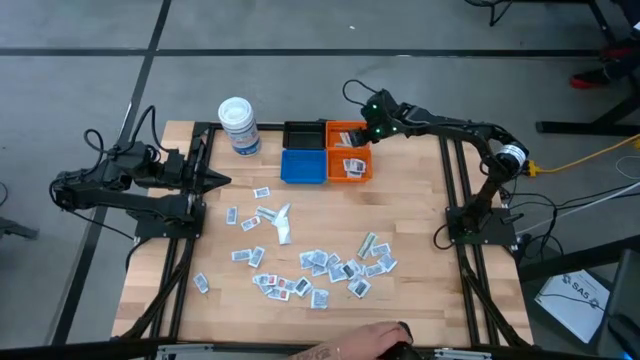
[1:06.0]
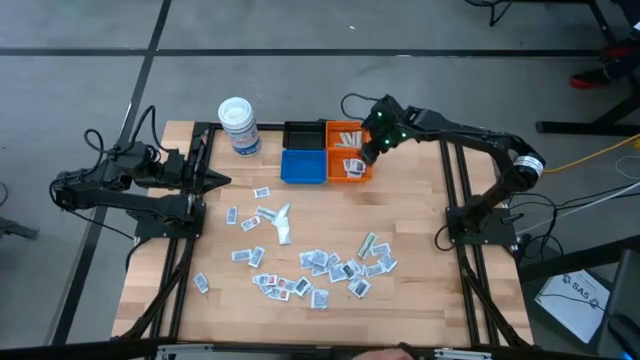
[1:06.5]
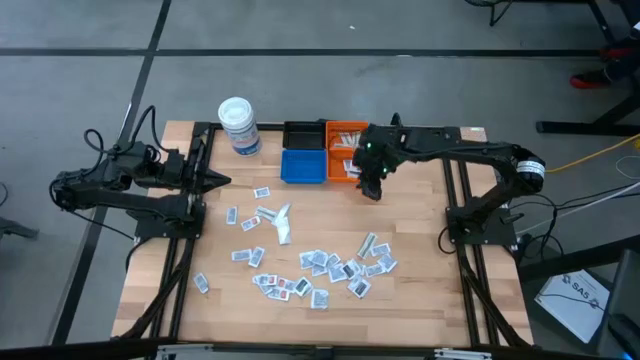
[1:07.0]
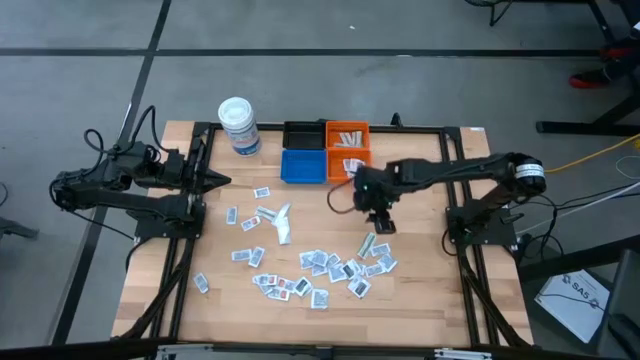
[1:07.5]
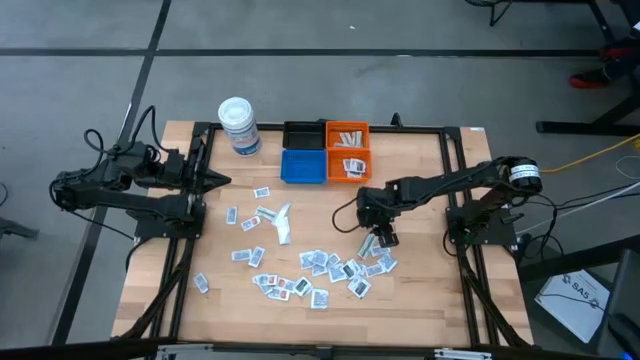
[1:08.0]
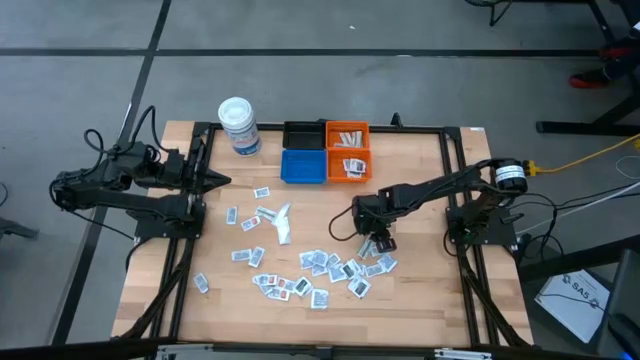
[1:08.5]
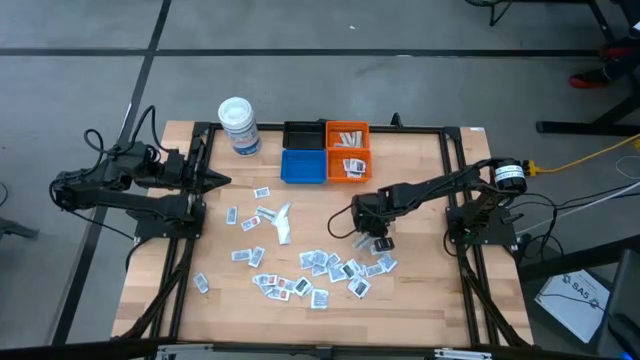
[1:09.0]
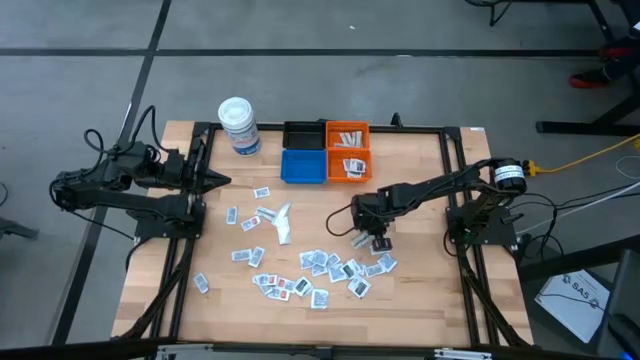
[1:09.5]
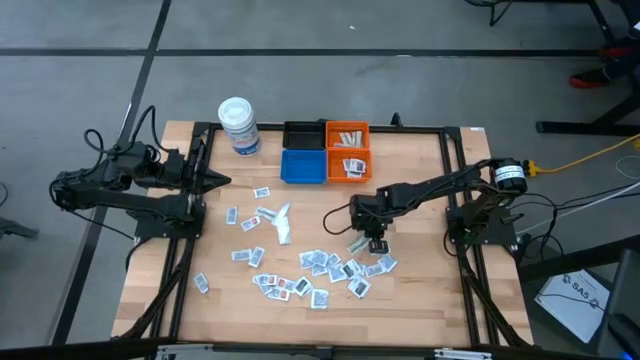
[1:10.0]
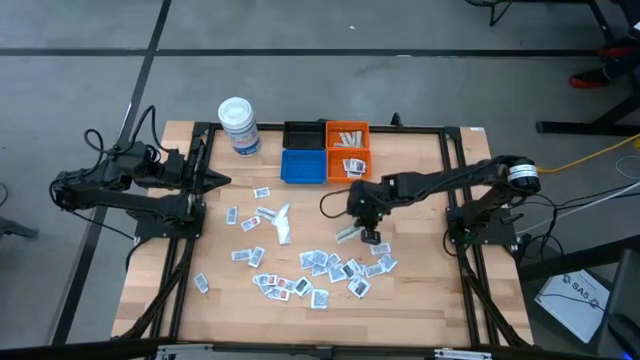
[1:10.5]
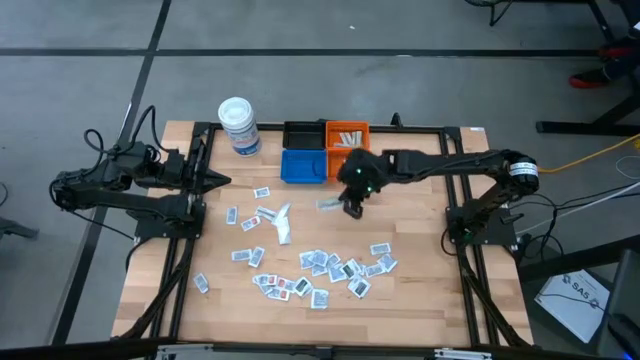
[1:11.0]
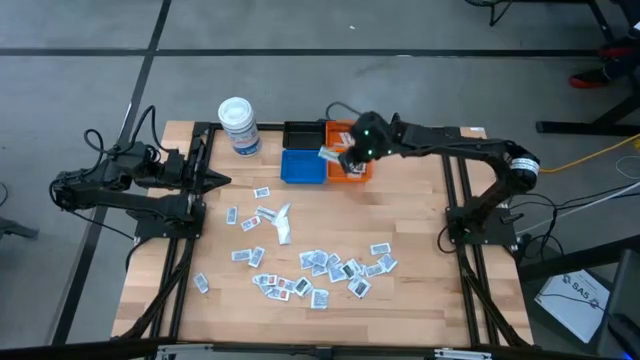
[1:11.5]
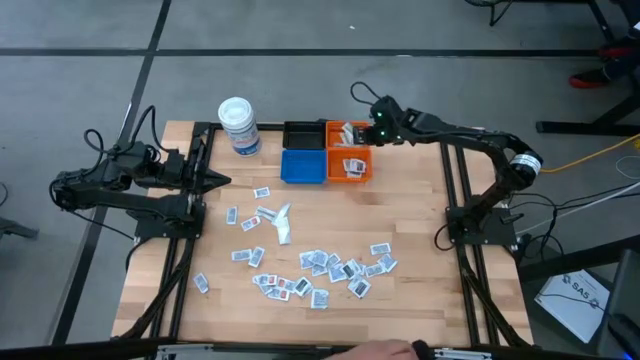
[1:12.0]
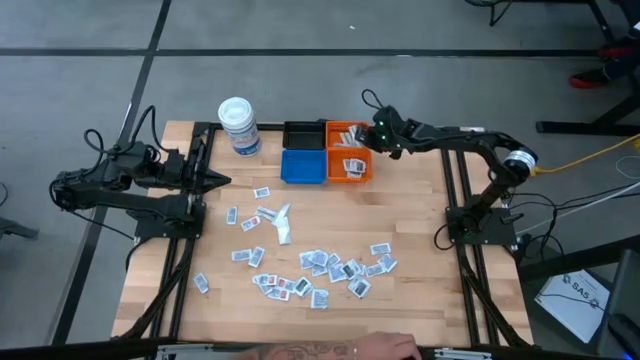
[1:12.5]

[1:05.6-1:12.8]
Task: Pick & Place First Aid Supplies
Put the bandage pack into the top orange bin

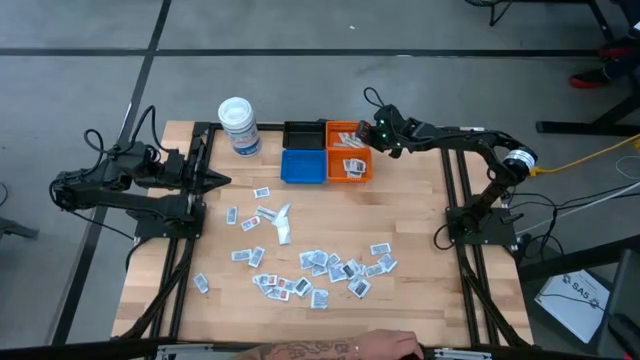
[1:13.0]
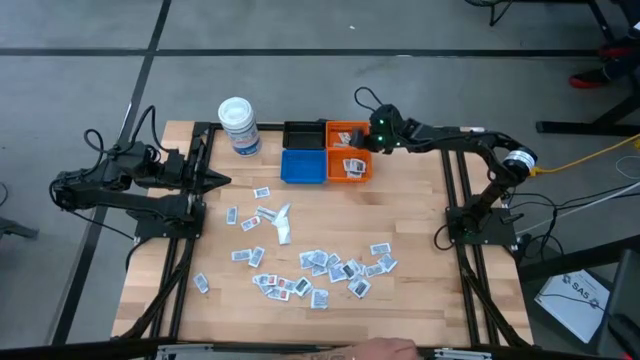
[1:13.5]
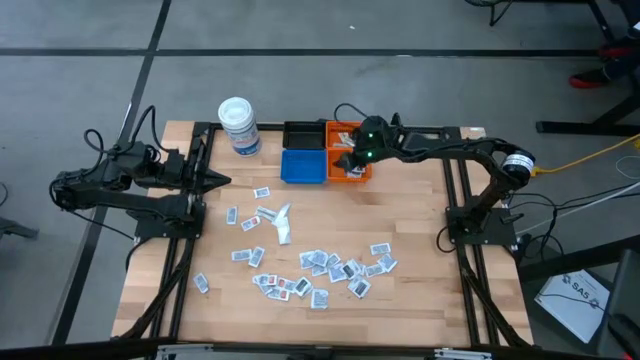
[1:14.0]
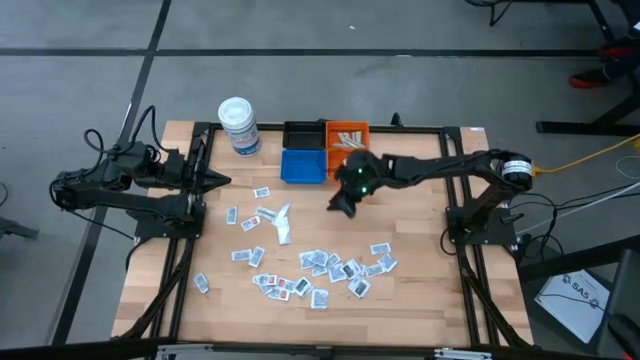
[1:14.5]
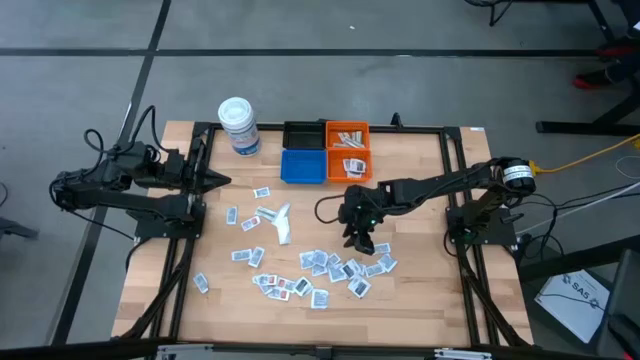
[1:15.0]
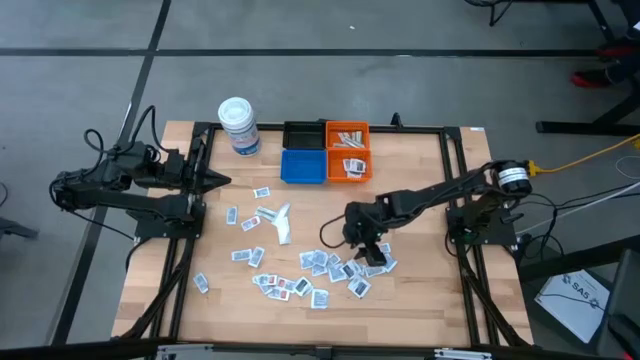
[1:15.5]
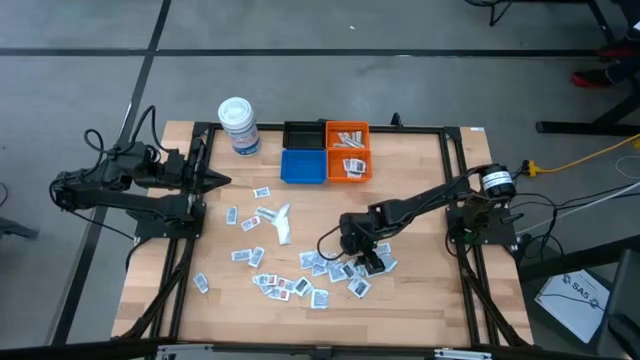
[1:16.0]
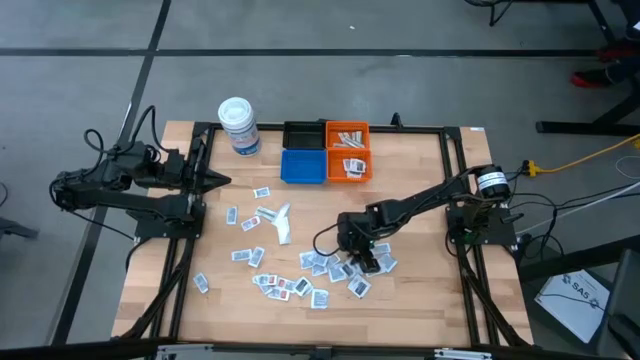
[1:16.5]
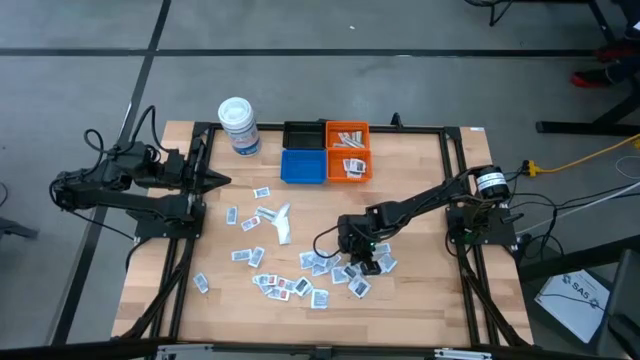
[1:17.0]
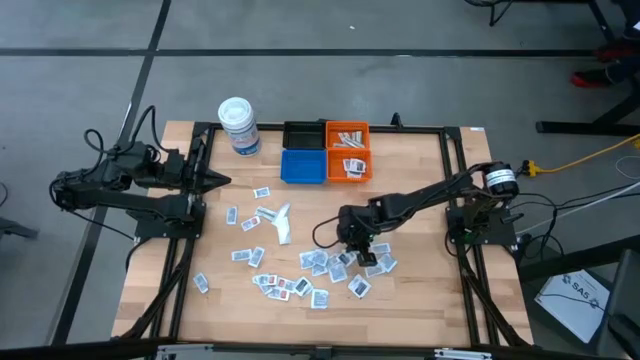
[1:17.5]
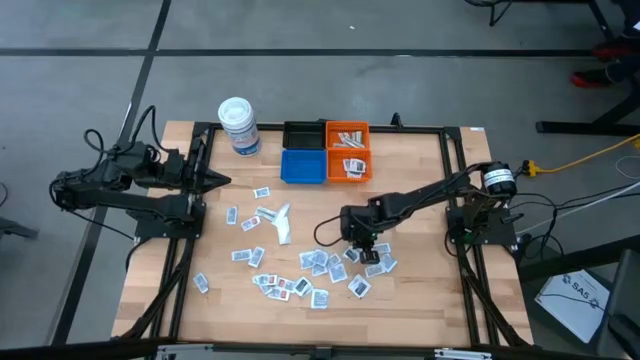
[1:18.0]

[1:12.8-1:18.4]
Put the towelette pack into the bottom orange bin

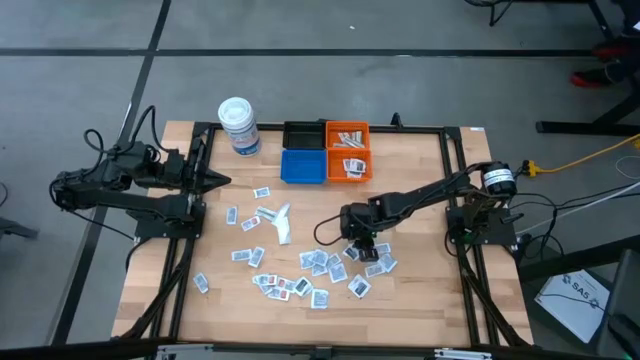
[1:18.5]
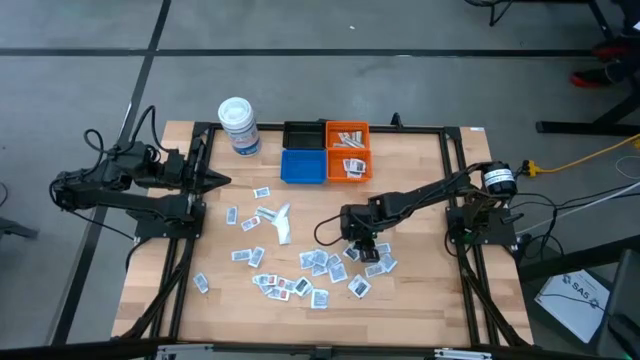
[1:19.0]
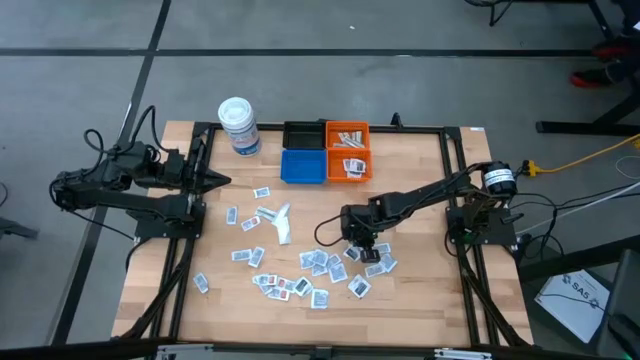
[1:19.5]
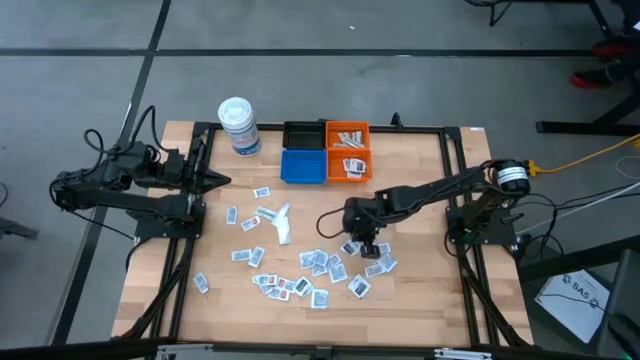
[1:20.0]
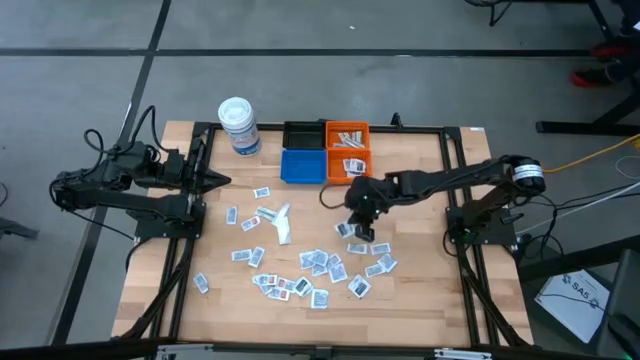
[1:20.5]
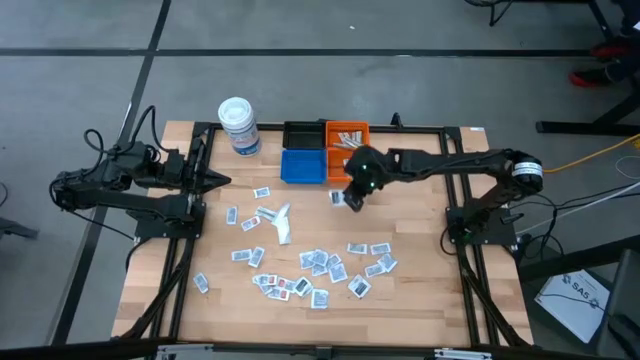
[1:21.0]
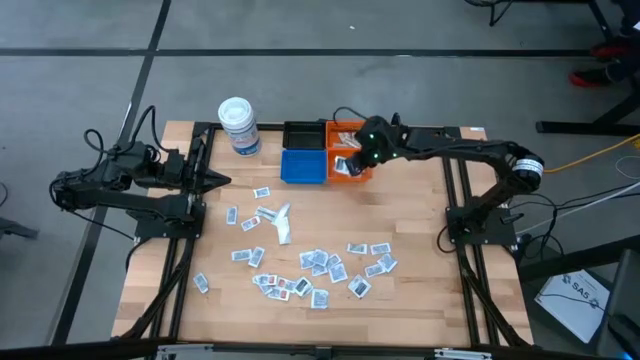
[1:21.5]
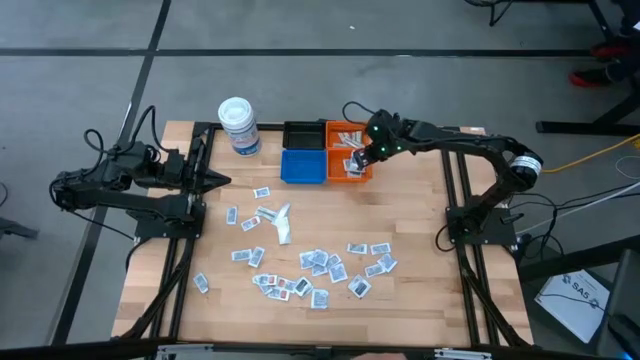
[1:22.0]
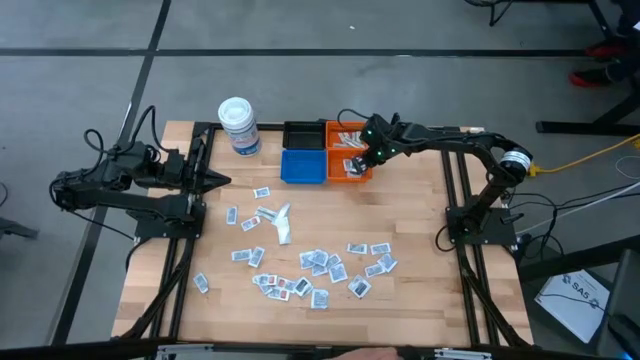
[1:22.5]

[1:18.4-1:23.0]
Put the towelette pack into the bottom orange bin

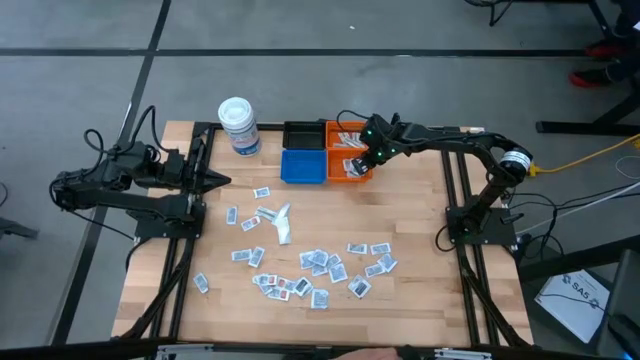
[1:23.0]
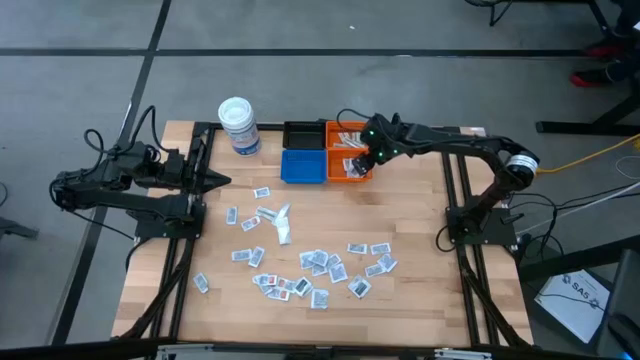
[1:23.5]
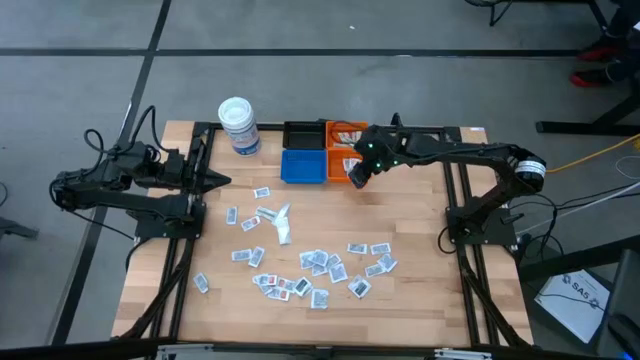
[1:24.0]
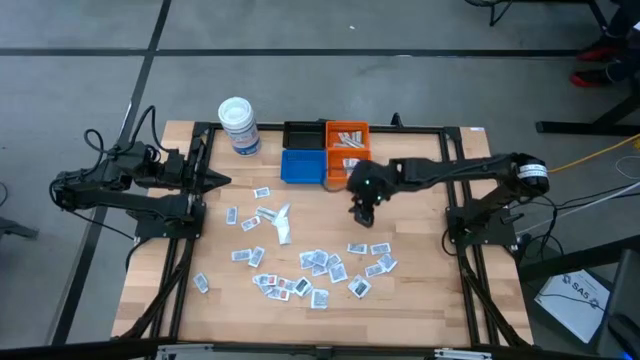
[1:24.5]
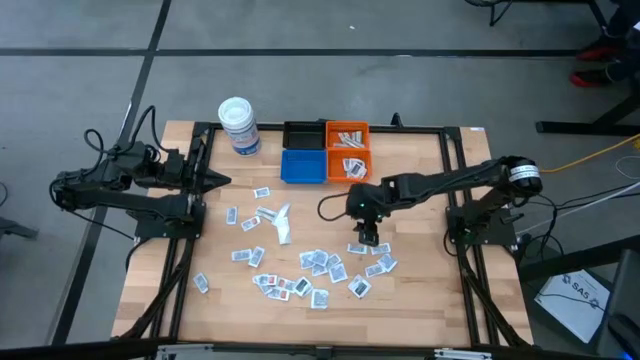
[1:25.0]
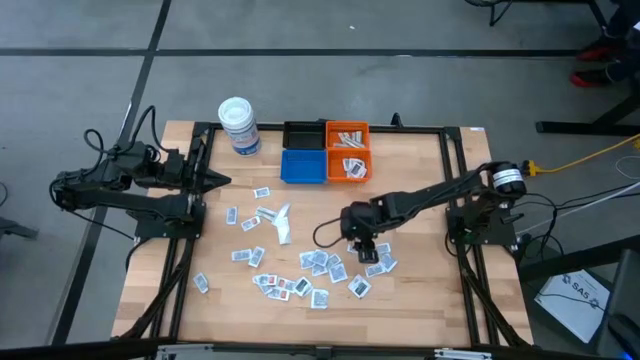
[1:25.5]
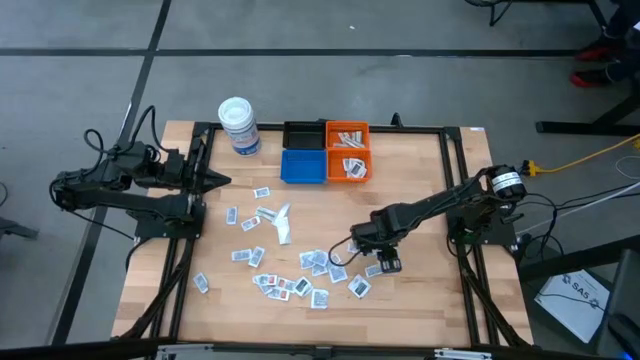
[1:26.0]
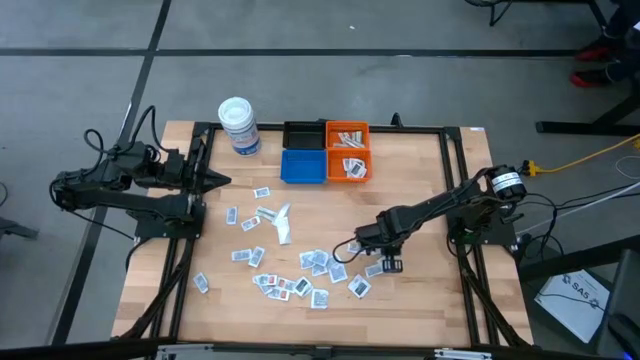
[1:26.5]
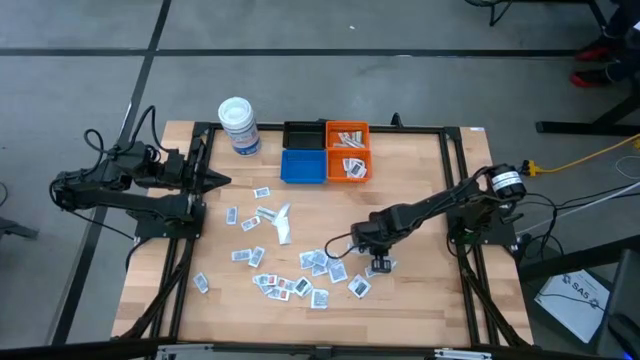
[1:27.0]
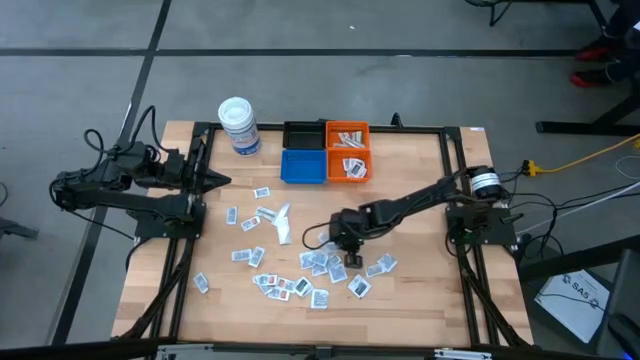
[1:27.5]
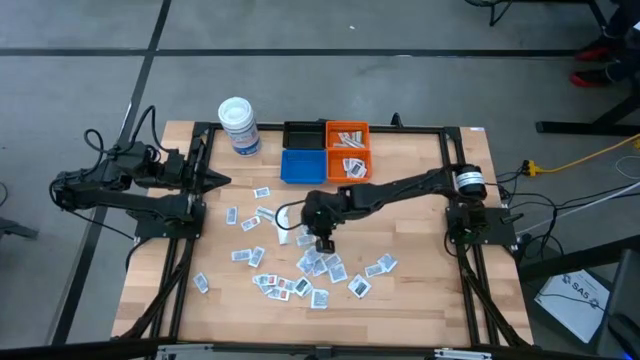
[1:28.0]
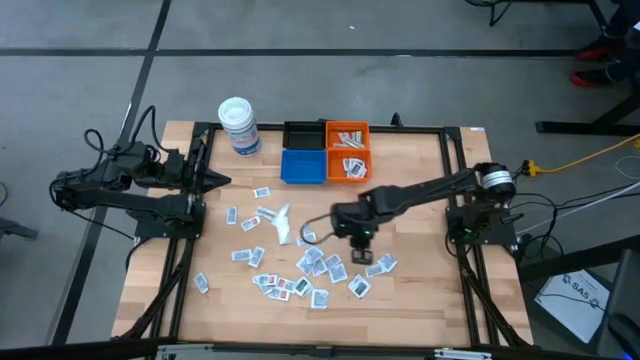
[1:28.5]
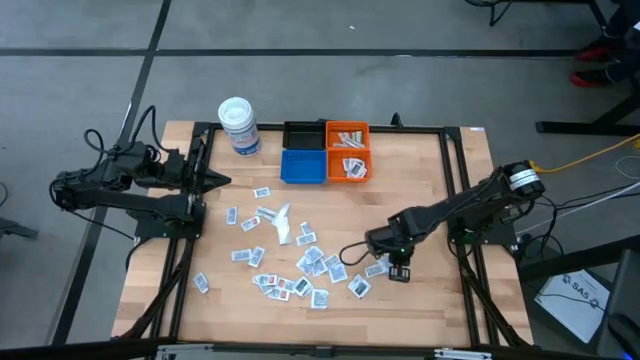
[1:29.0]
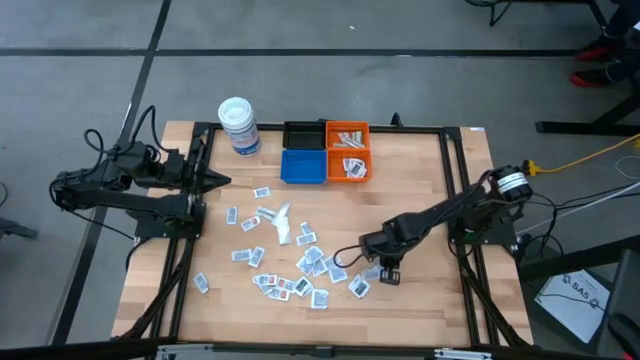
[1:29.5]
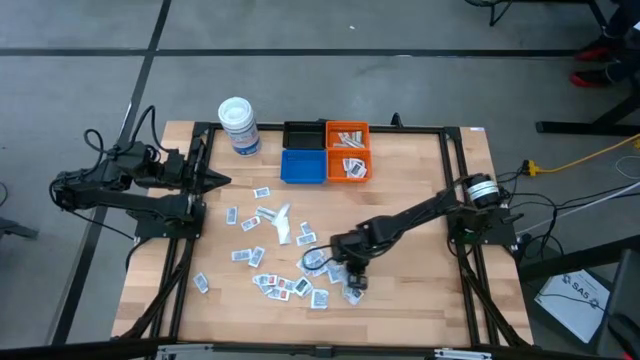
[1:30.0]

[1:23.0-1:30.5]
Move the wound care packs to the center of the table
